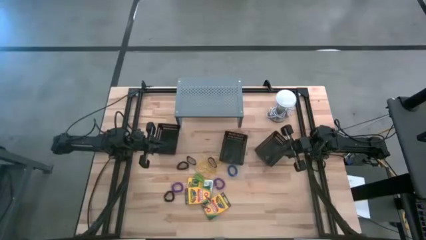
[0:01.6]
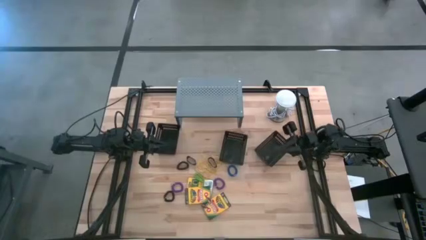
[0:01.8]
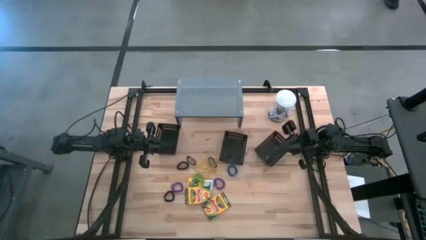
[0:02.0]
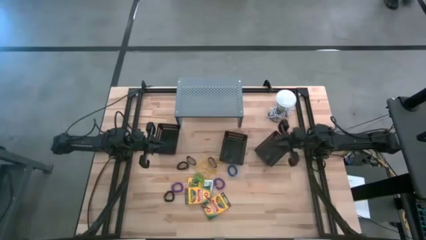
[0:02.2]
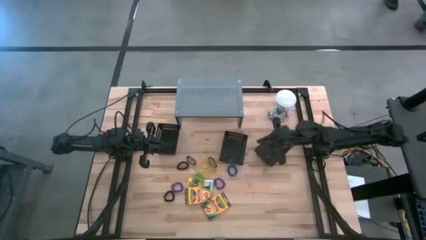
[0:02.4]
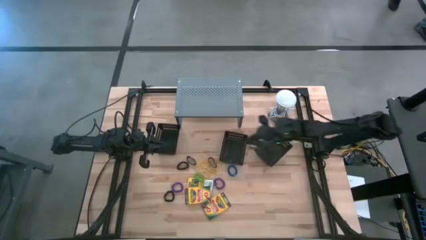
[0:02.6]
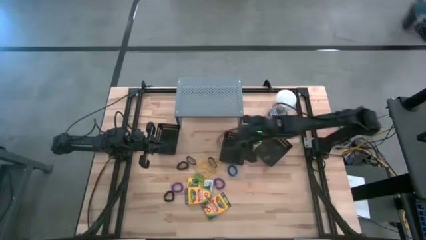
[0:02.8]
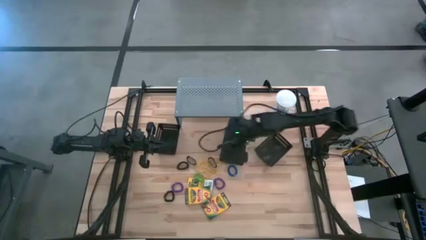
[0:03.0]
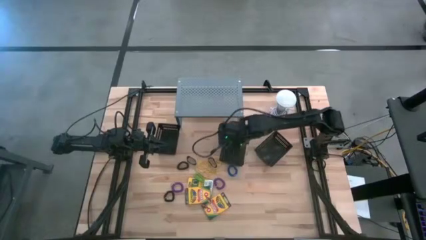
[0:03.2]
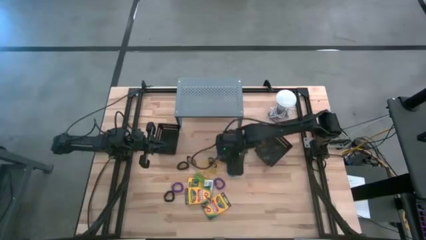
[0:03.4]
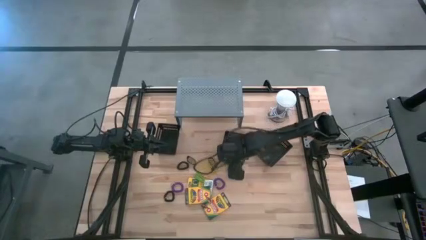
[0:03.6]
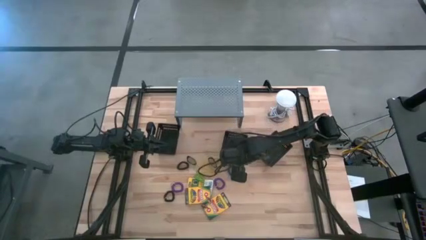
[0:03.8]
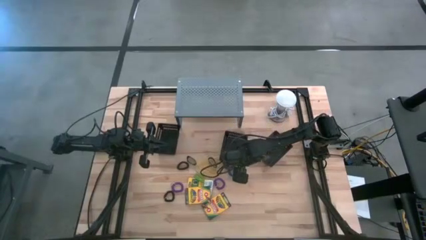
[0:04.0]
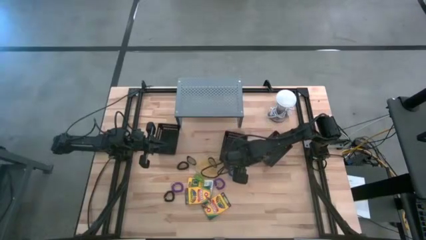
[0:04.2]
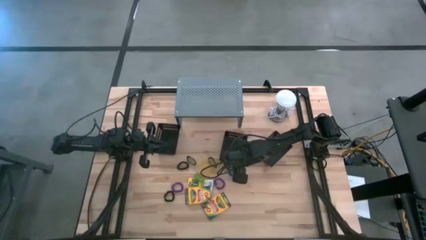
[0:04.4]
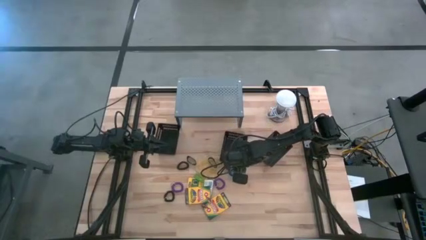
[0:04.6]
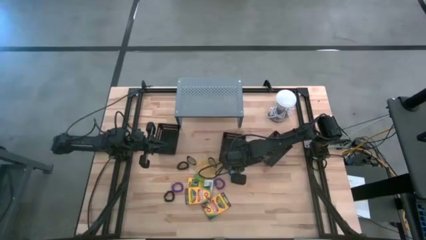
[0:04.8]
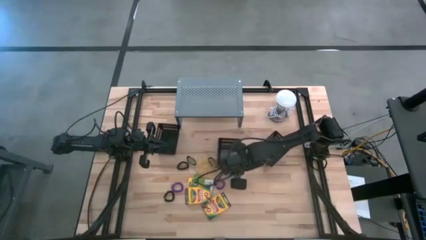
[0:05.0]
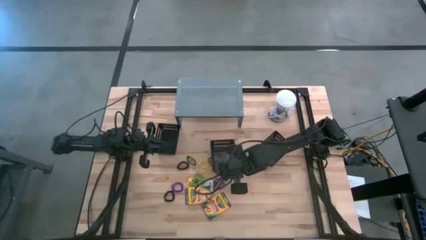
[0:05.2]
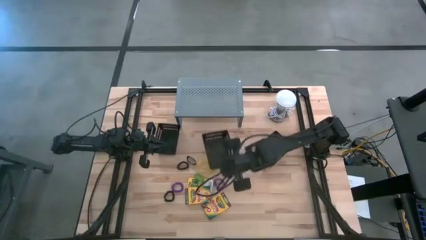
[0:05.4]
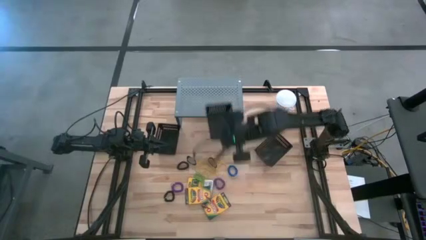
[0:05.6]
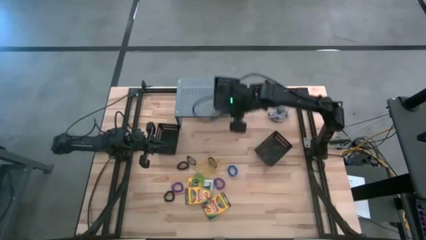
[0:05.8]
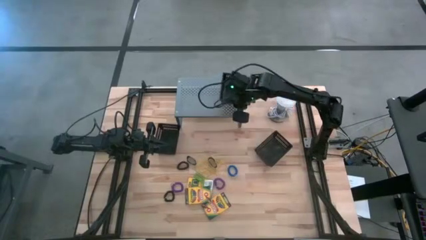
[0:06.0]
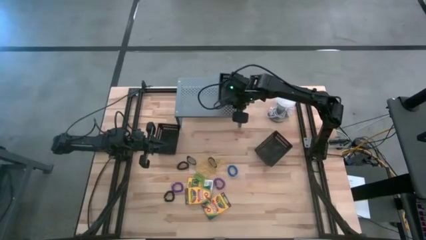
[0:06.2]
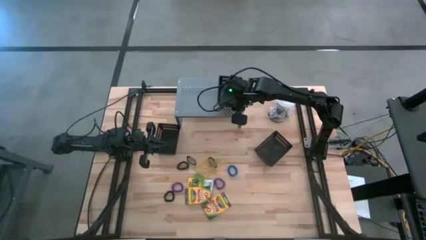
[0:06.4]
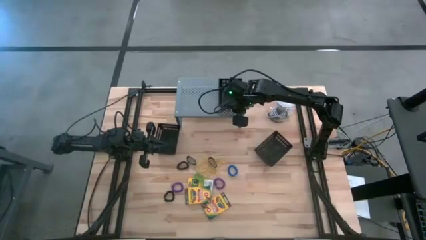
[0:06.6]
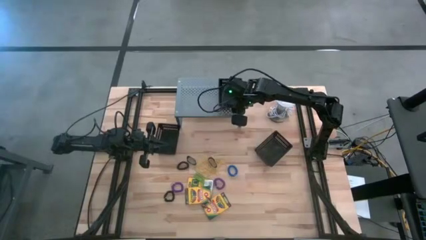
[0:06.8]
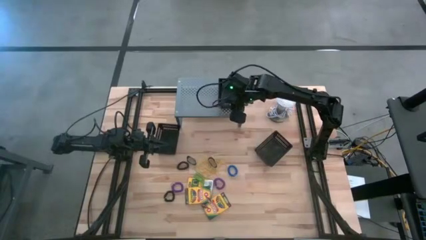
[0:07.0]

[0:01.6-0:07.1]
Task: Pick & Place Office Desk Supplies
Put the black bin on the shelf

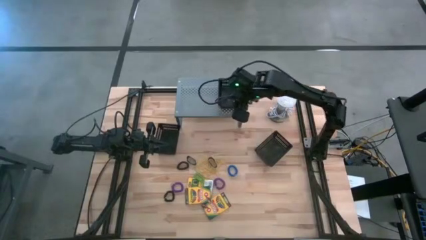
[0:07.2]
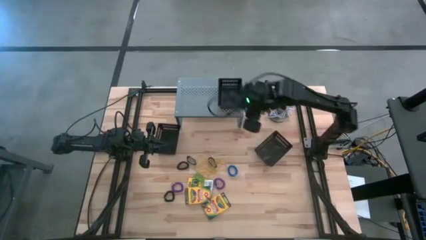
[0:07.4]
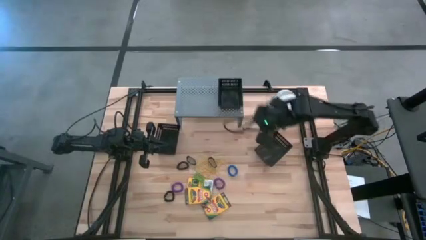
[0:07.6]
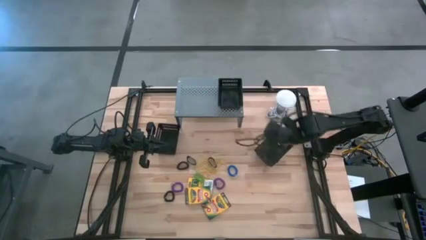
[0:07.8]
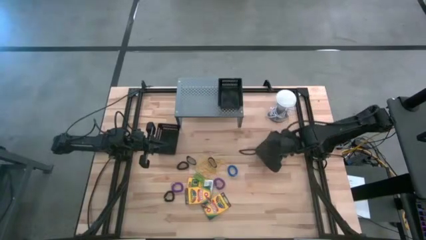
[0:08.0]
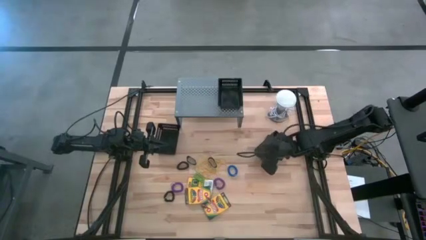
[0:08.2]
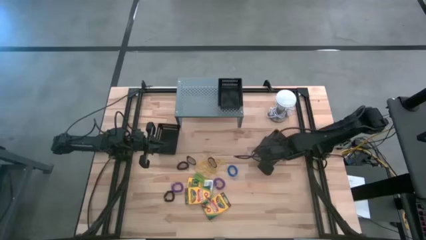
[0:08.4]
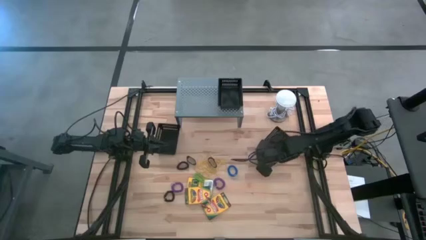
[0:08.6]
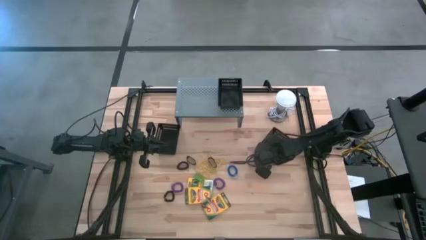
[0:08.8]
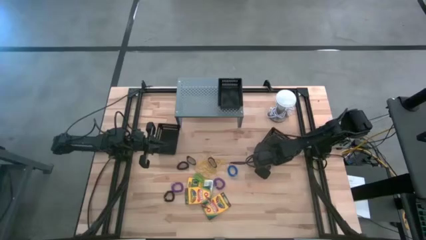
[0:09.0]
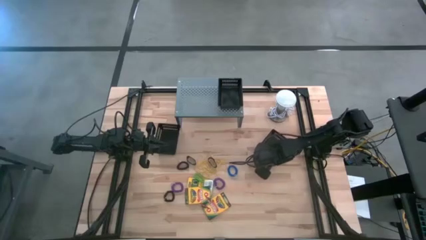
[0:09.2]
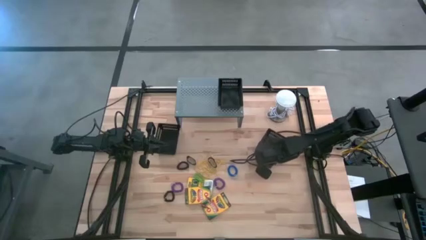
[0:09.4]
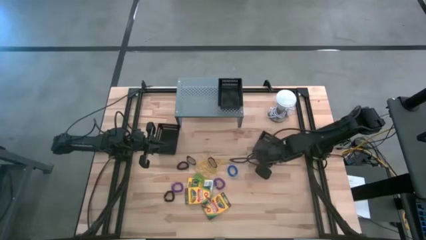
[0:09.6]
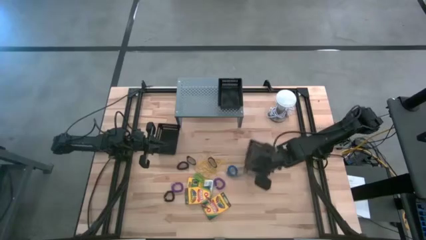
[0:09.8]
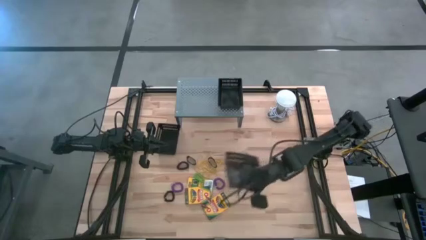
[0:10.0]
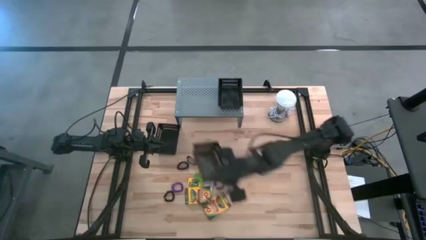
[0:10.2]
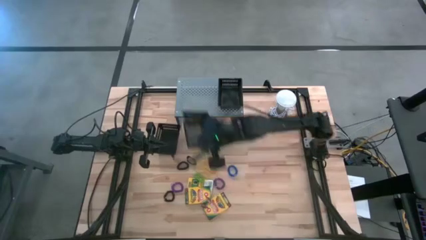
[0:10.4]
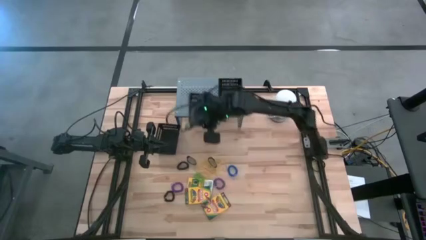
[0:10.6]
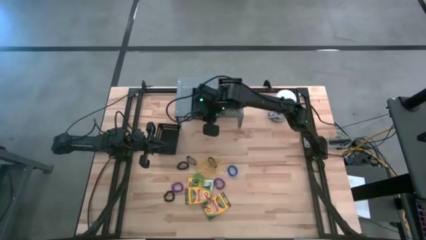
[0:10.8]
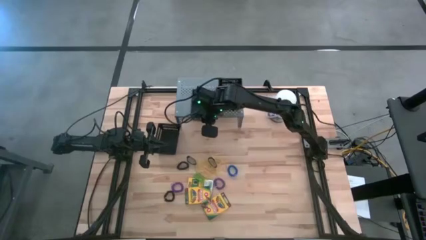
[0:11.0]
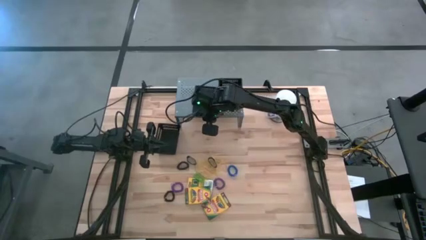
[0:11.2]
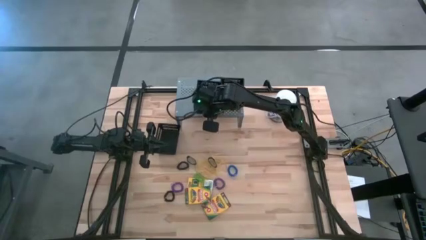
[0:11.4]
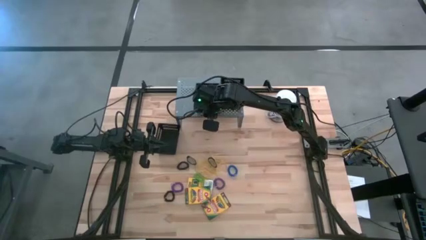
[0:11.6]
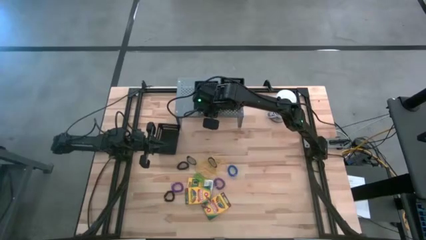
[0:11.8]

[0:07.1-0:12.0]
Align the black bin on the shelf with the other black bin

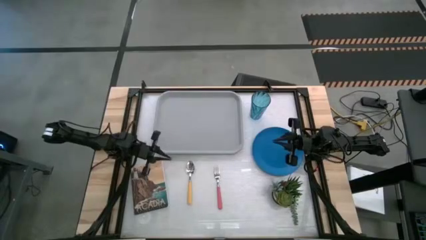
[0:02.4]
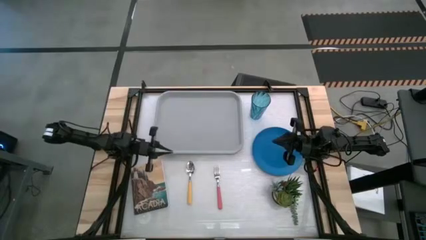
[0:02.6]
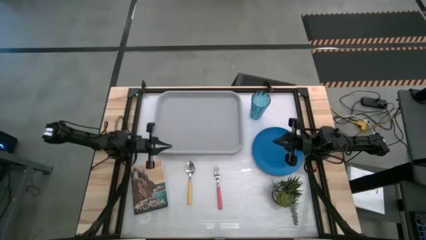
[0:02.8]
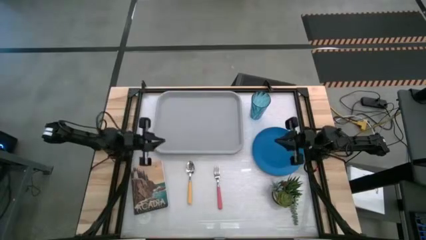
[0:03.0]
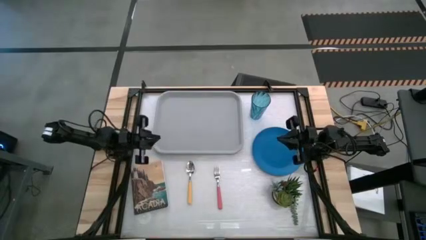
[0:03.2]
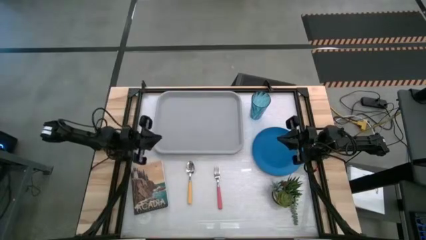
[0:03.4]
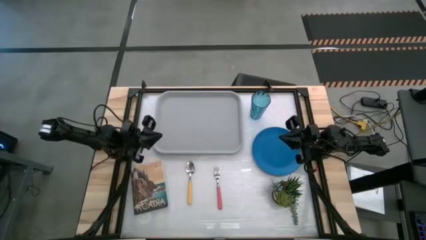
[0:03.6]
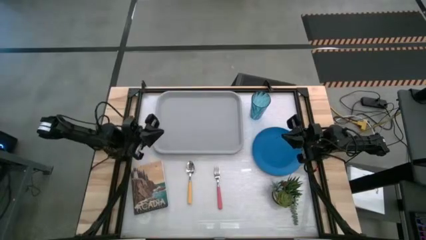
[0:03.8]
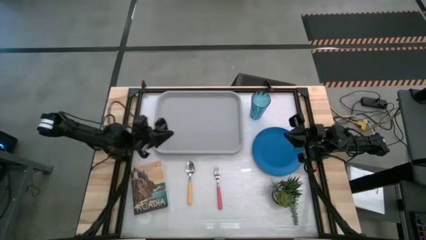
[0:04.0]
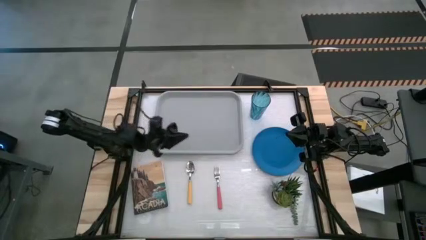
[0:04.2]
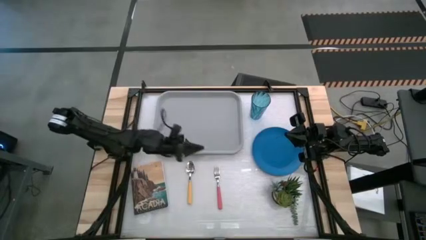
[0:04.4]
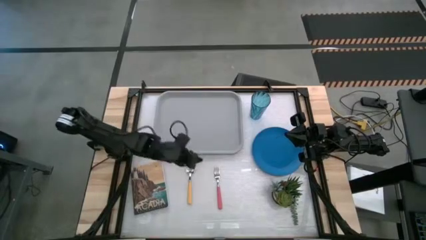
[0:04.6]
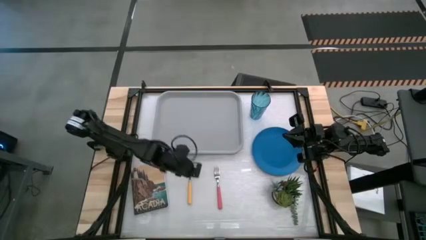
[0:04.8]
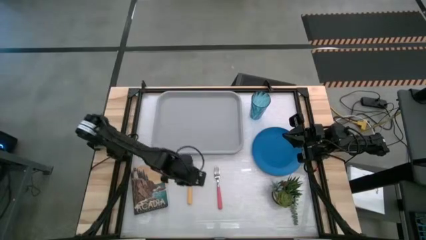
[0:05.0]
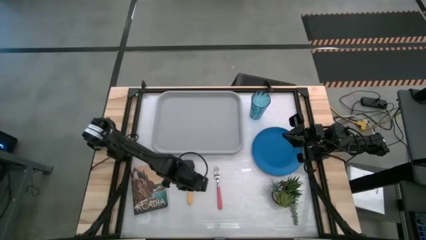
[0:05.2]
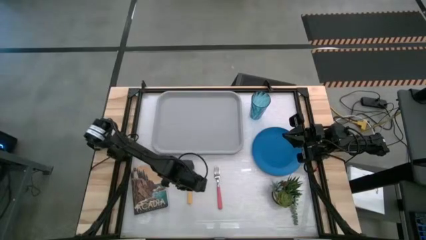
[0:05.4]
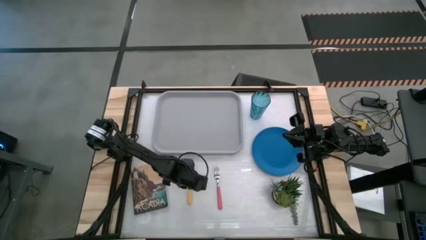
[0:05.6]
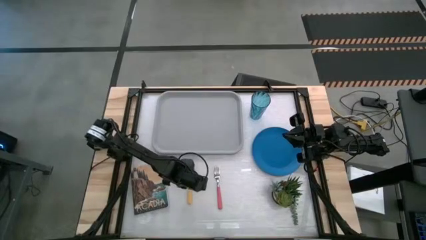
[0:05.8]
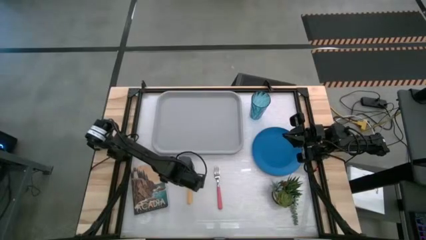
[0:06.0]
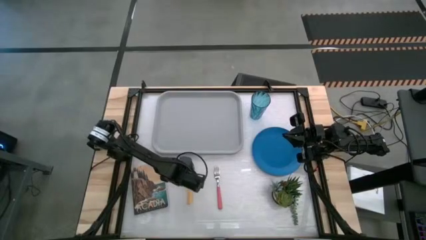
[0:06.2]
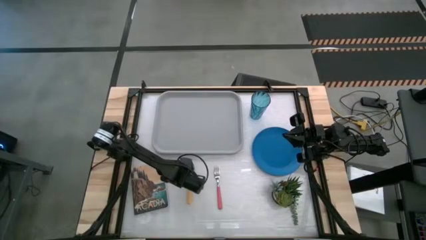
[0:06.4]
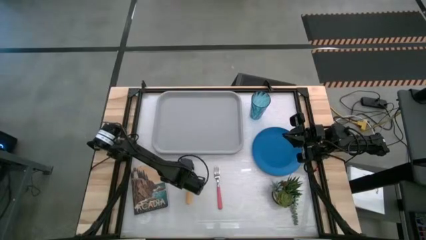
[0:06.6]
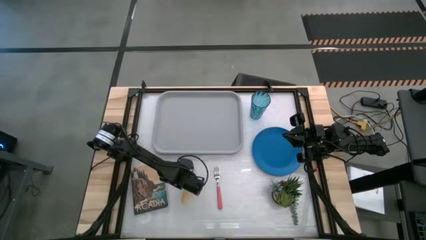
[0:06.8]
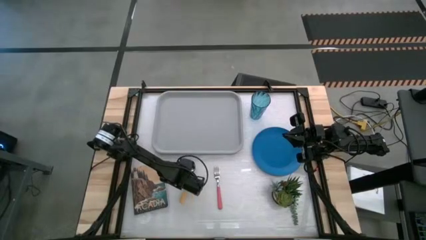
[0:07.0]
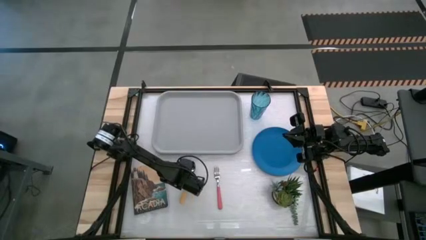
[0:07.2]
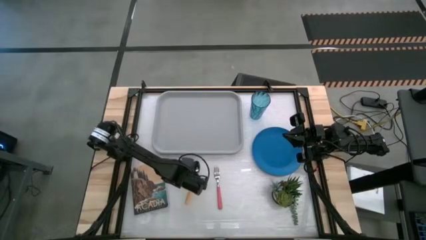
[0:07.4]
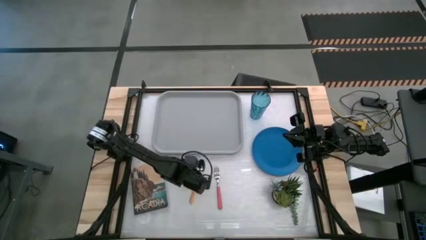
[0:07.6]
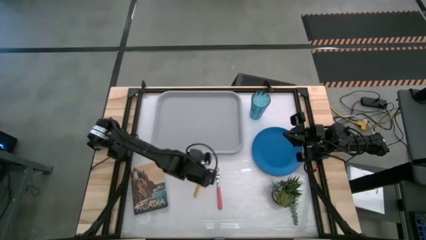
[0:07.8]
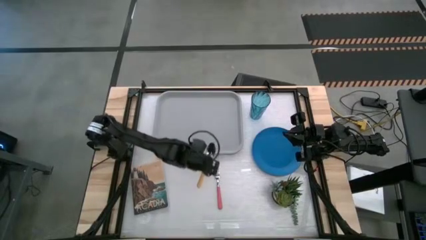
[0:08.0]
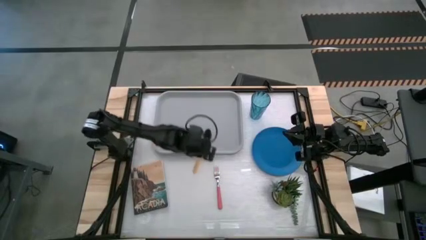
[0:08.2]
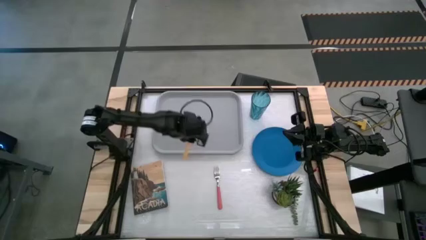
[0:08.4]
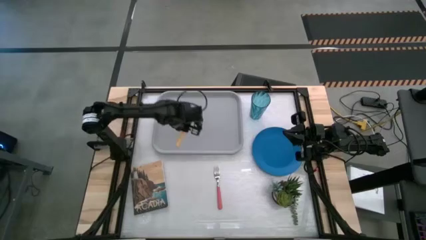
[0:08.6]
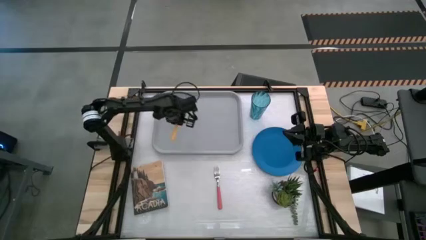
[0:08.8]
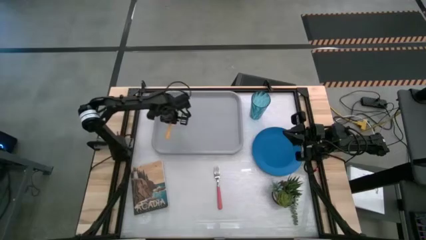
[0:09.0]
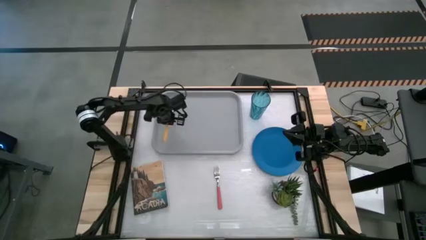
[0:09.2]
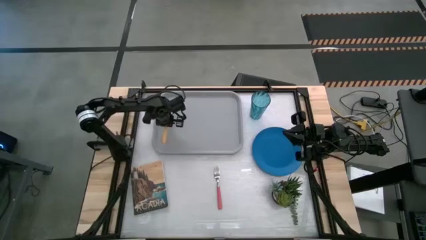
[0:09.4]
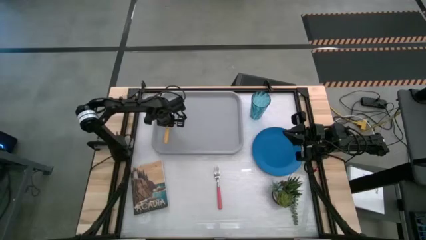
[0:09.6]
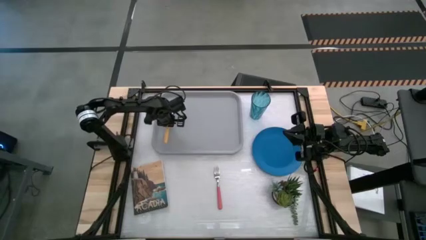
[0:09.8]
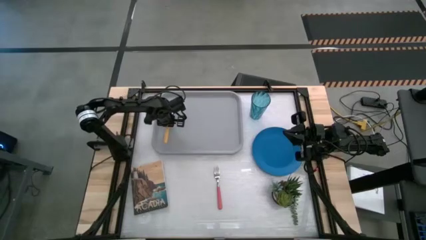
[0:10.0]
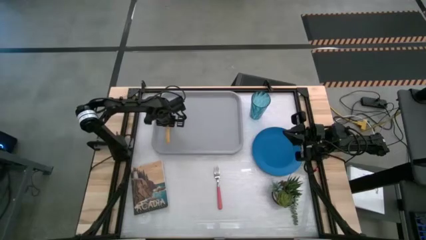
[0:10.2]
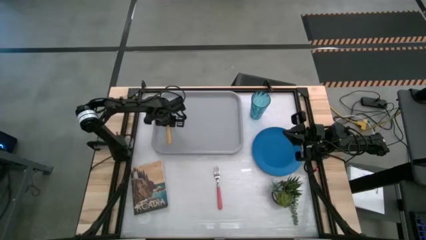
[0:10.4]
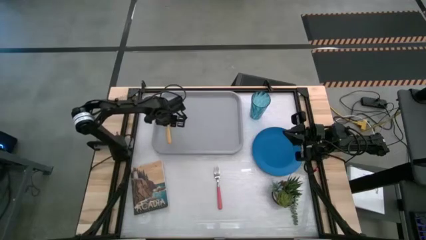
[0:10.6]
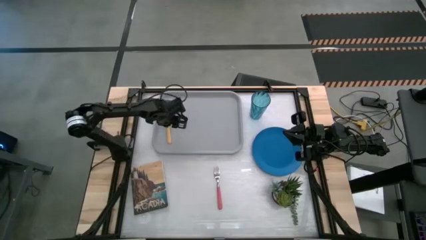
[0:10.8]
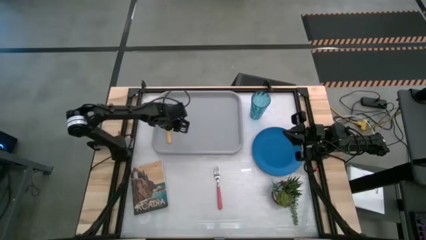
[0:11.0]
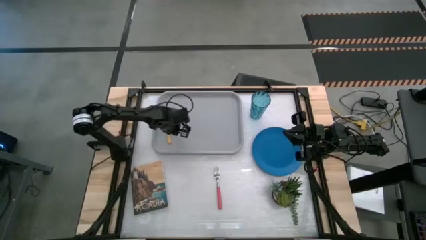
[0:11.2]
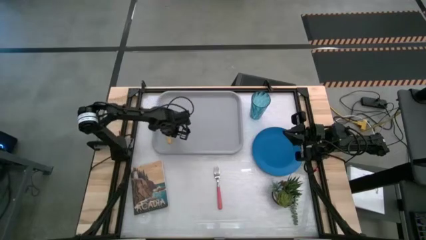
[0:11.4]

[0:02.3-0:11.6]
Task: Pick and place plate/cup/fork/spoon on tray
Put the yellow spoon on the gray serving tray
